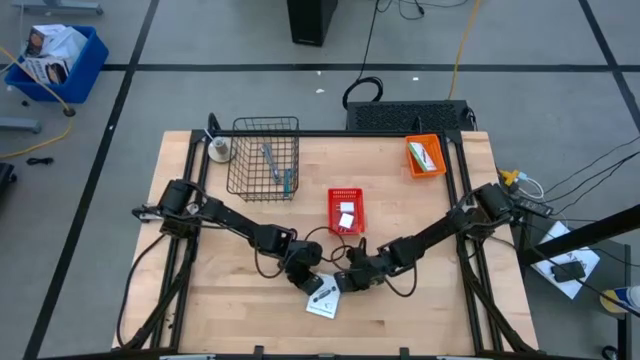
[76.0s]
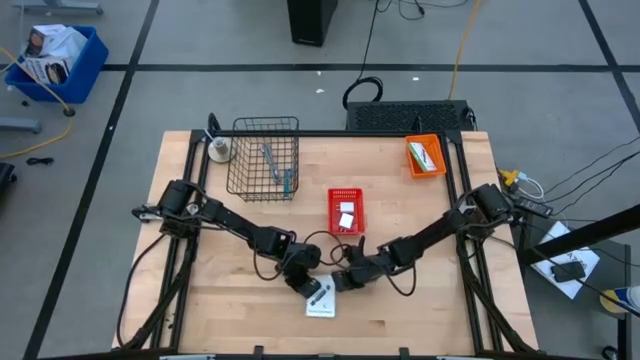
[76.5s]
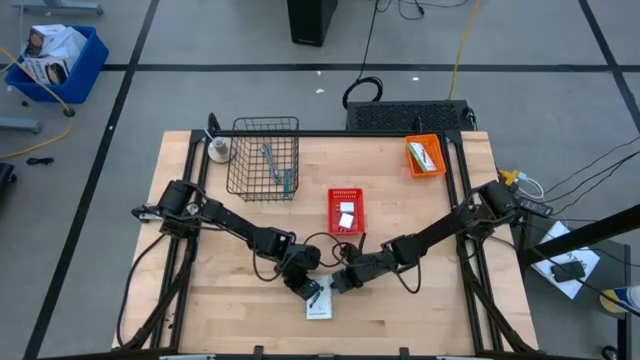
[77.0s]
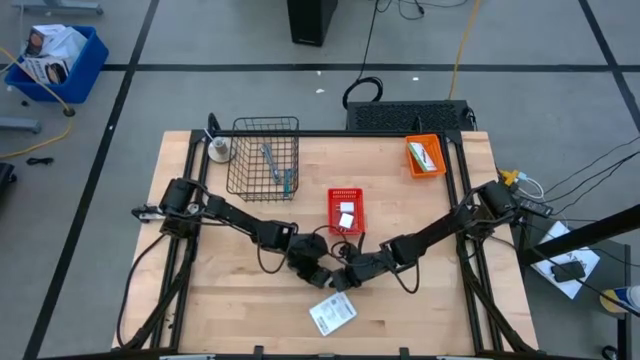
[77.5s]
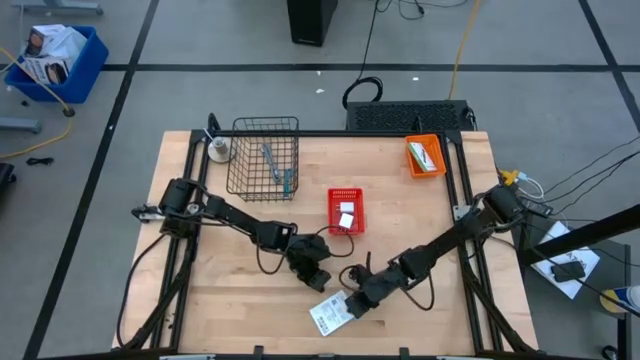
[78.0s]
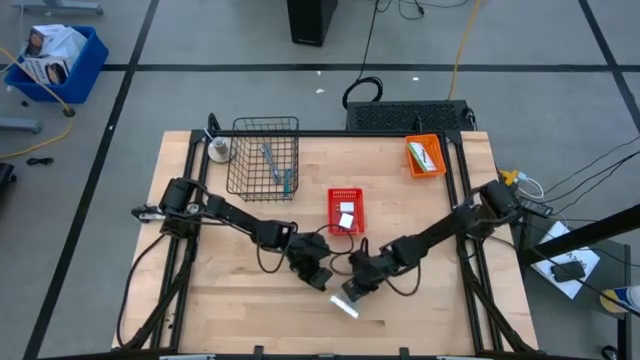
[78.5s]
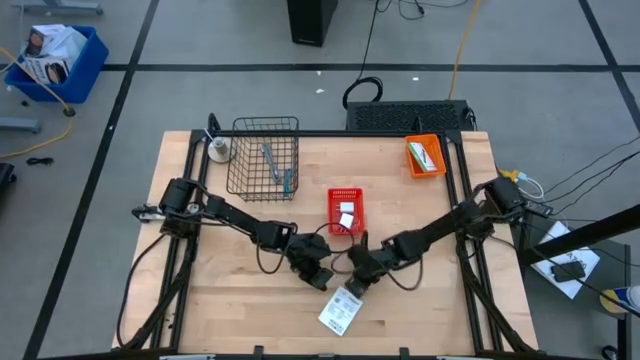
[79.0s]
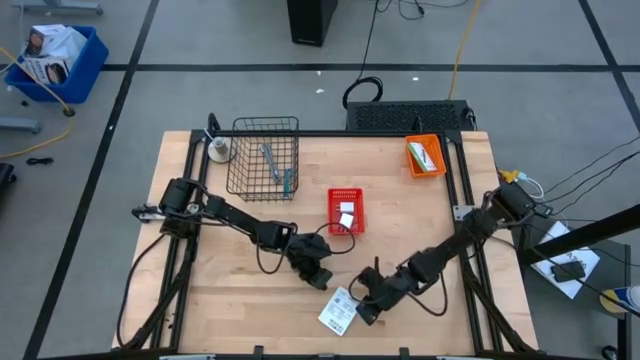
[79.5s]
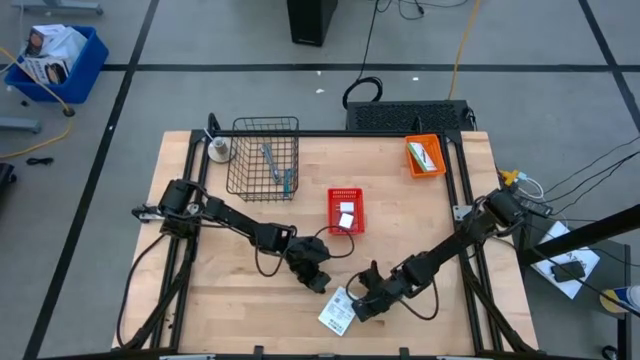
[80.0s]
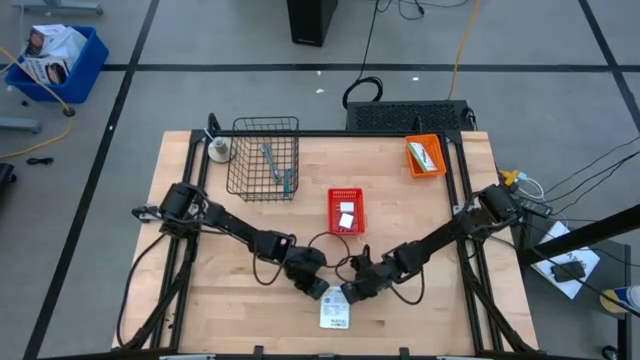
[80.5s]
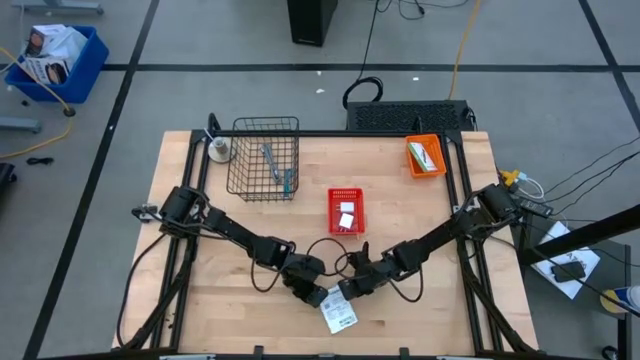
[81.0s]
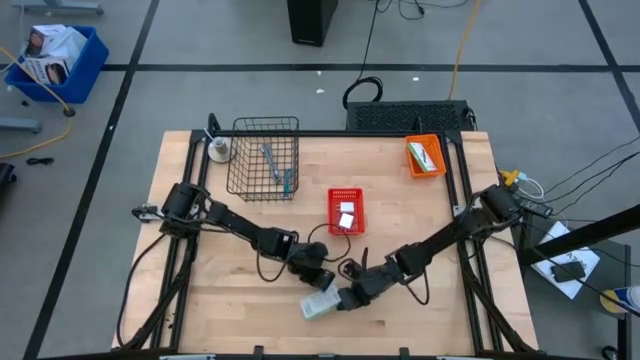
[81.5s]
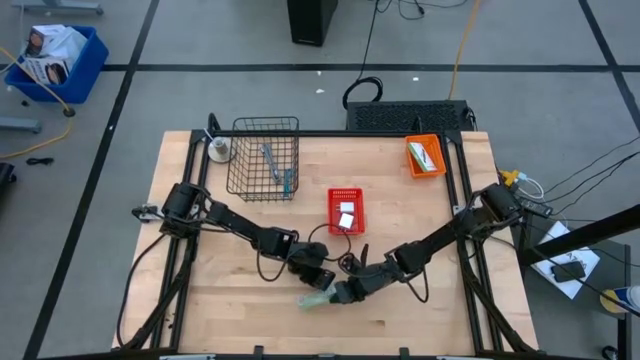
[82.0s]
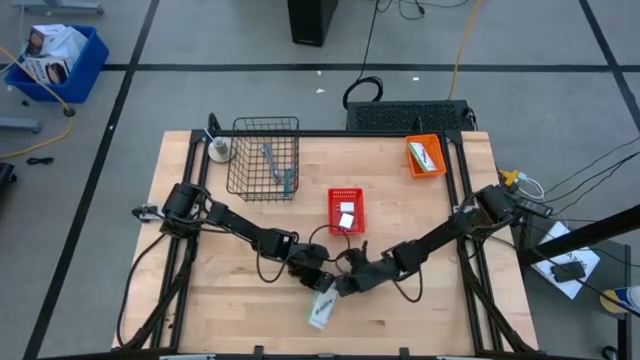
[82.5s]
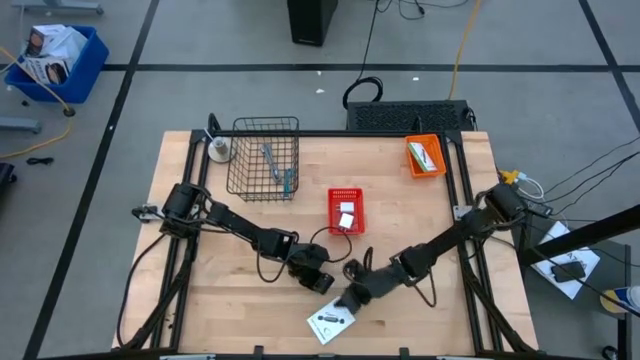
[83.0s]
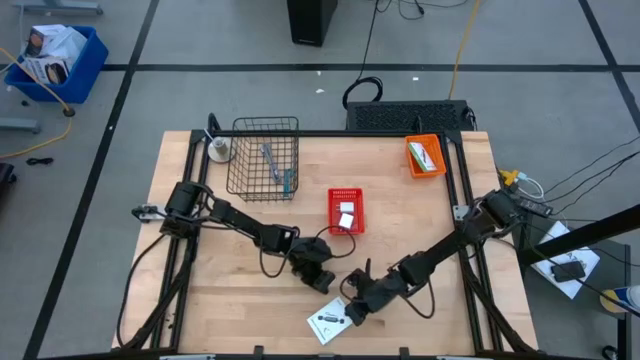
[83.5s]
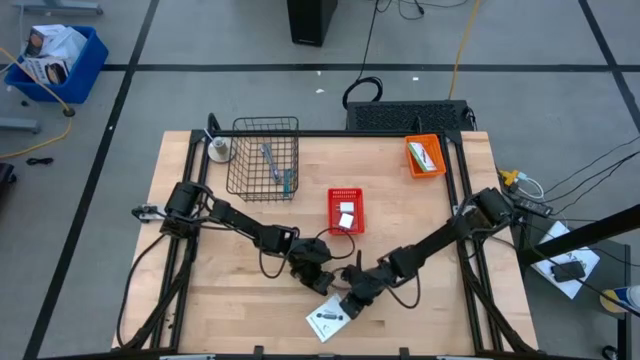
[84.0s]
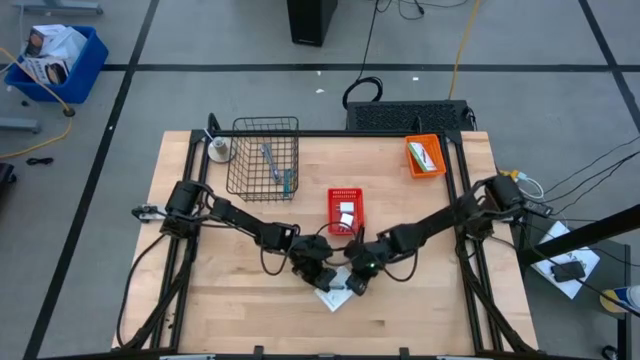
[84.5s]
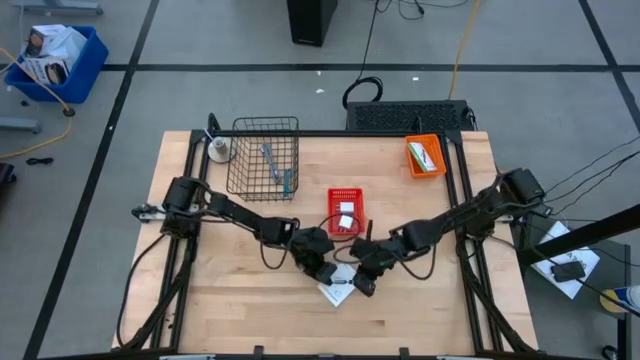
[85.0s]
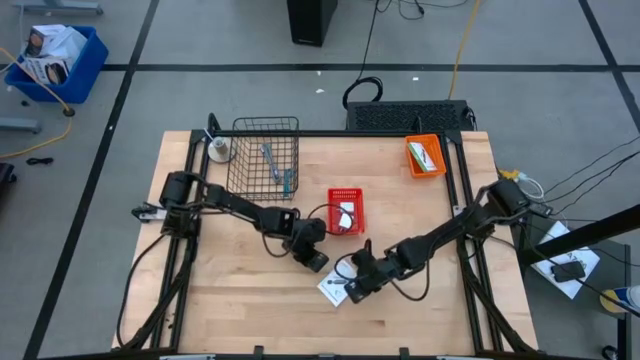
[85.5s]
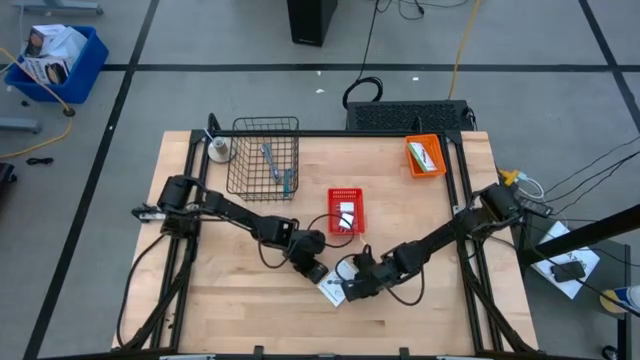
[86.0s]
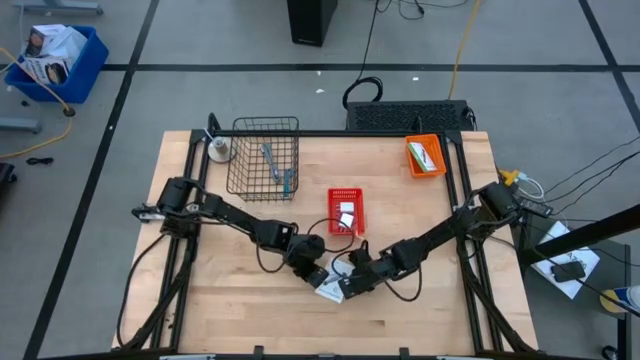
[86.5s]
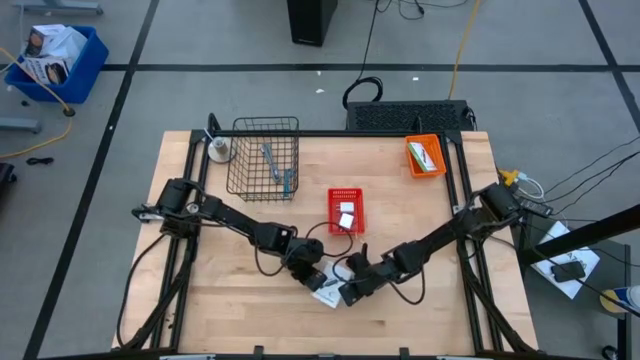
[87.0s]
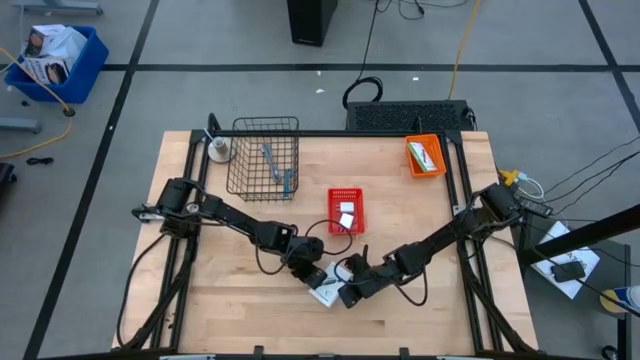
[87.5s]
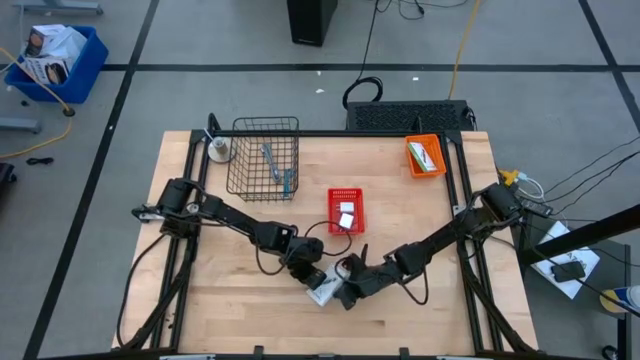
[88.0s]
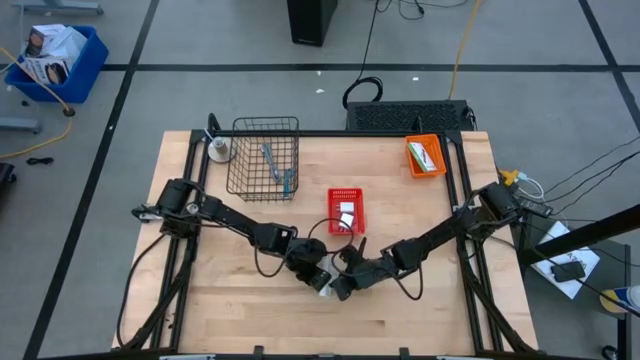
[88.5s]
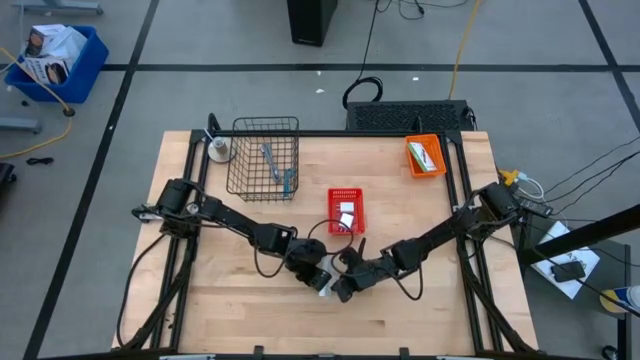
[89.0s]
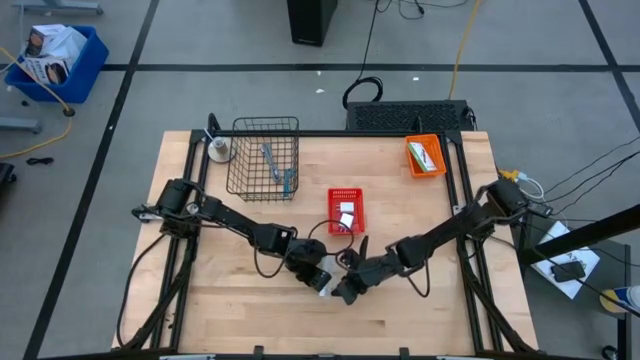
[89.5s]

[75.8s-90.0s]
Task: Pick and place items into bin
Put the white card reader box into the orange bin

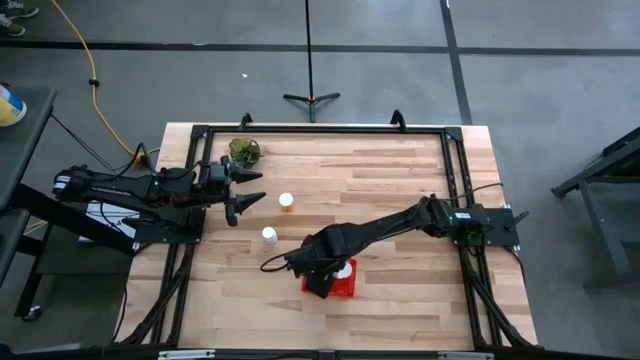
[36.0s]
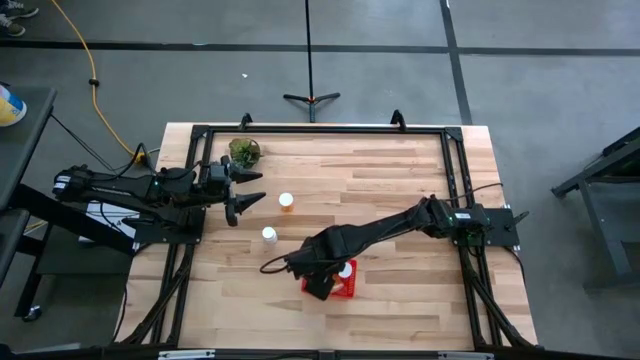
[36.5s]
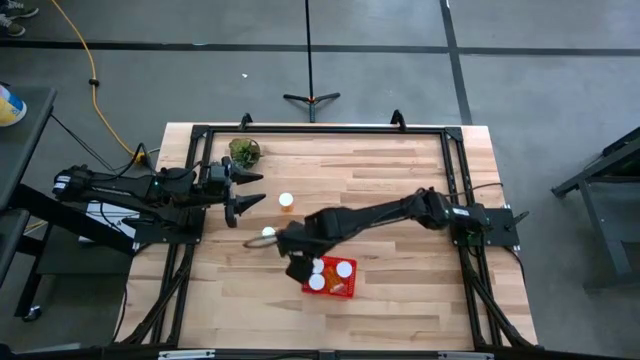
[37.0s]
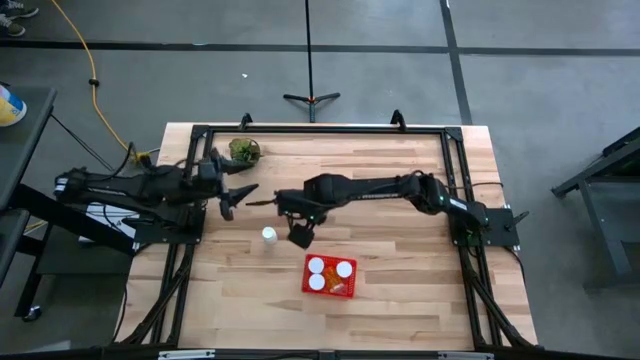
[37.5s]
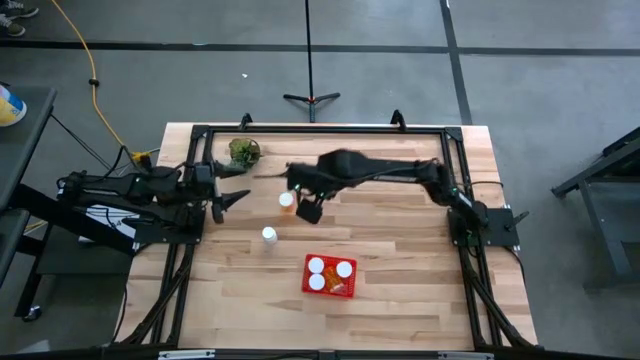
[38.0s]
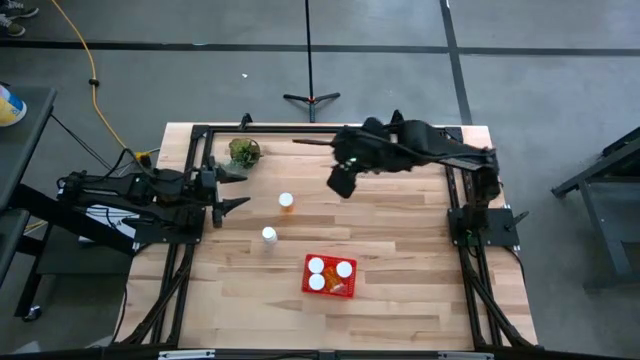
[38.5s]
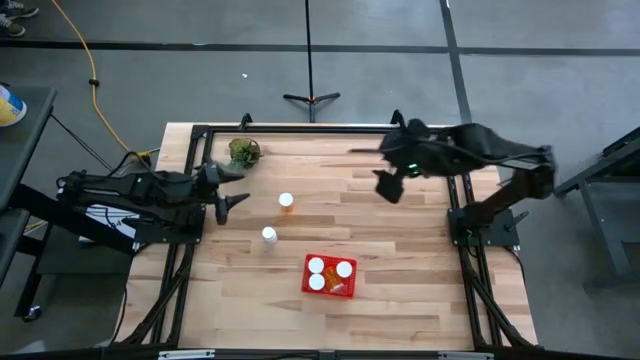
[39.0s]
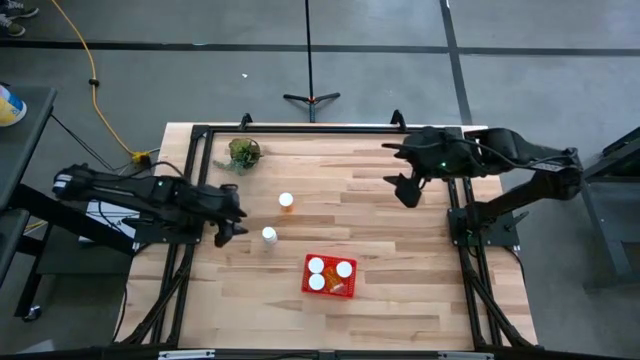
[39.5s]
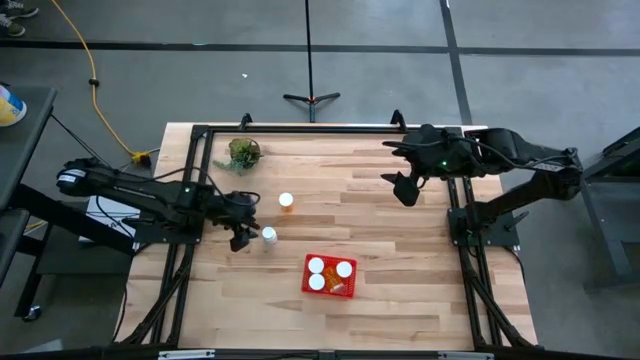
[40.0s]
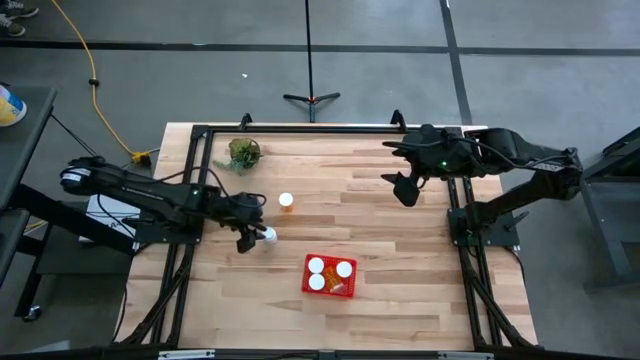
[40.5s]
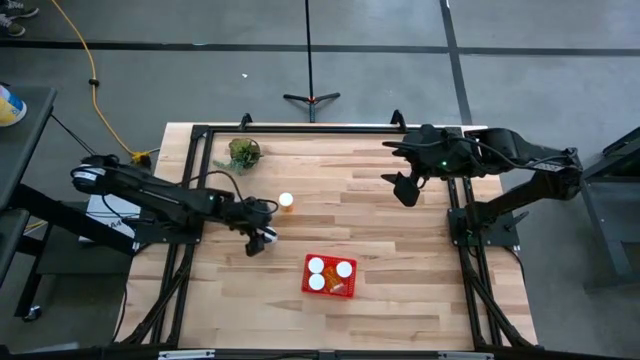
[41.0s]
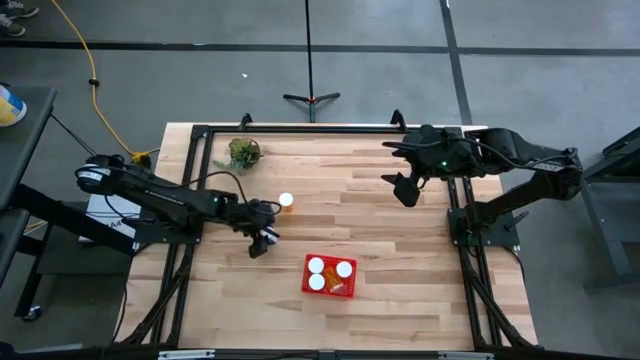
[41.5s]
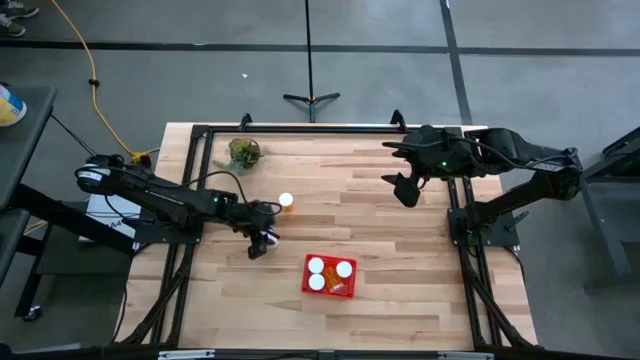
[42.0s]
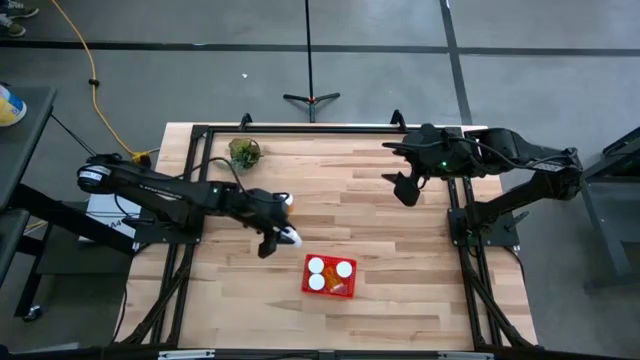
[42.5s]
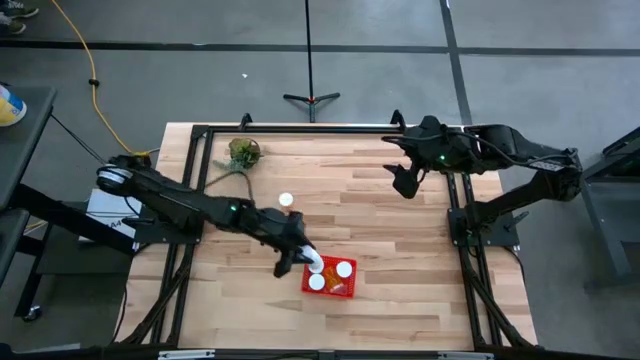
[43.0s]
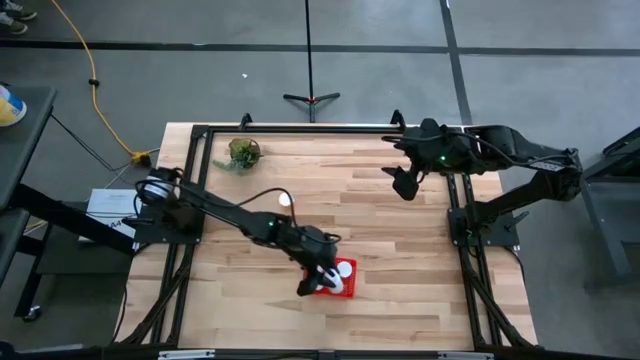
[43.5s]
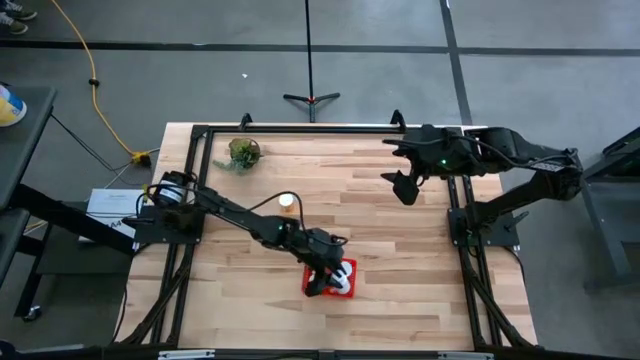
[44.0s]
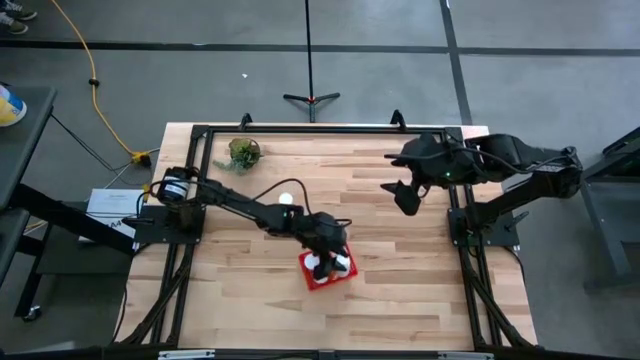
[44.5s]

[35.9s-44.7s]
Task: Pick and place pill bottles into a basket
Put the white pill bottle into the red bin
